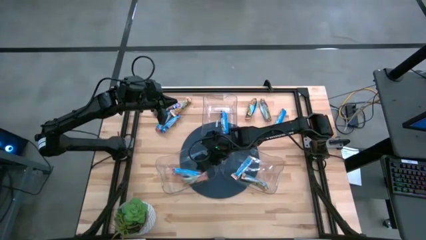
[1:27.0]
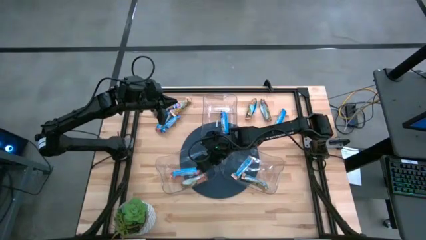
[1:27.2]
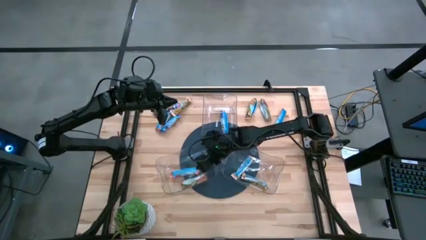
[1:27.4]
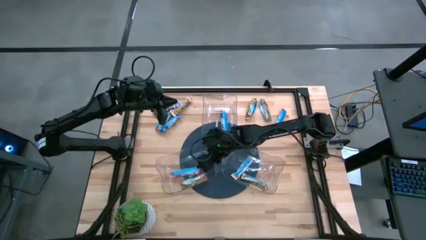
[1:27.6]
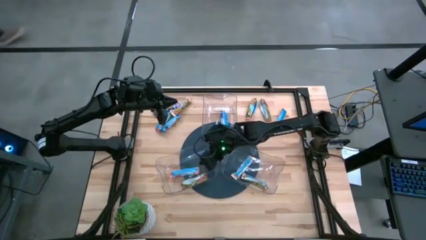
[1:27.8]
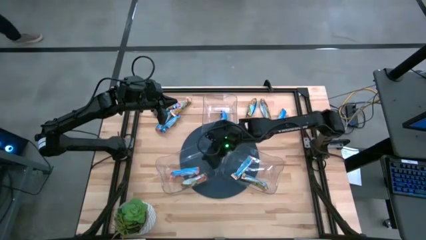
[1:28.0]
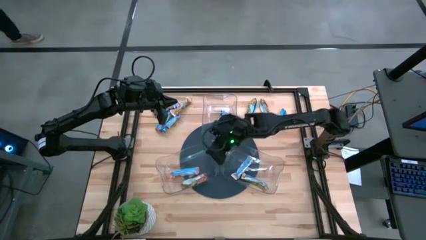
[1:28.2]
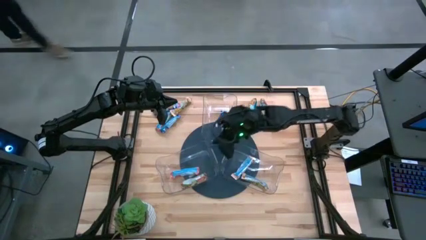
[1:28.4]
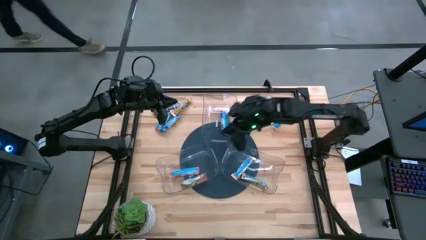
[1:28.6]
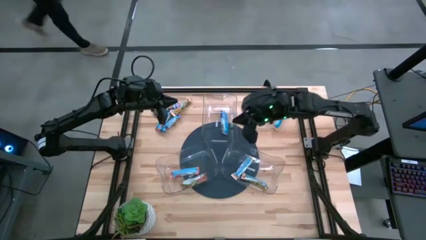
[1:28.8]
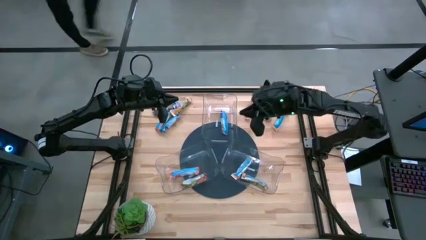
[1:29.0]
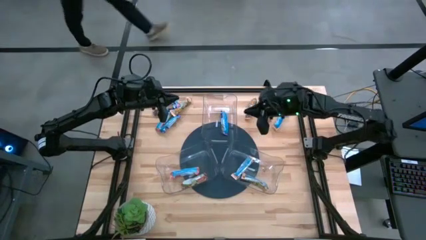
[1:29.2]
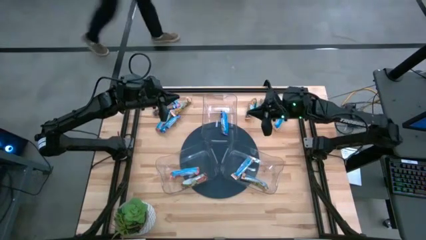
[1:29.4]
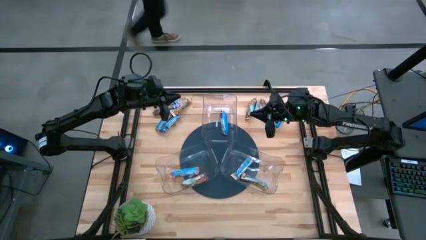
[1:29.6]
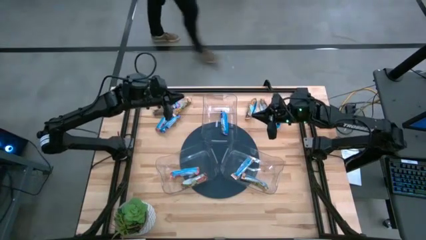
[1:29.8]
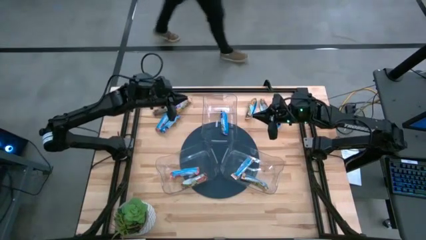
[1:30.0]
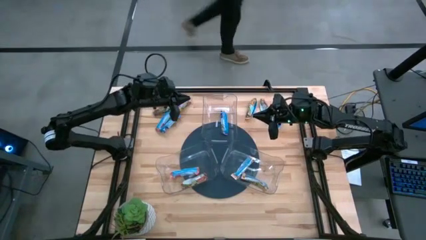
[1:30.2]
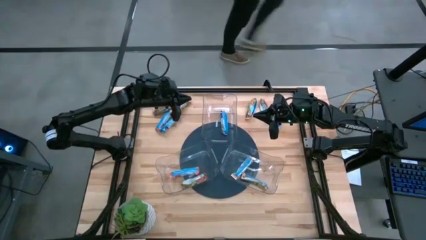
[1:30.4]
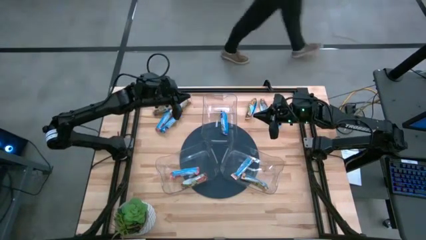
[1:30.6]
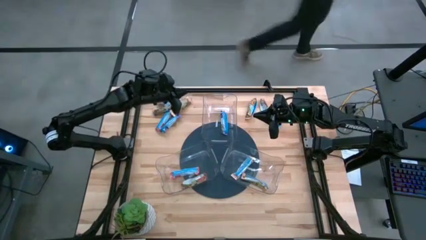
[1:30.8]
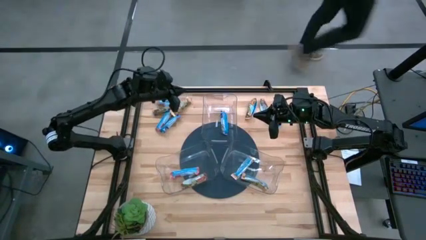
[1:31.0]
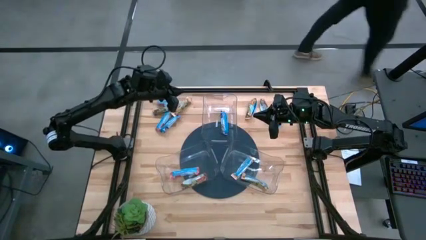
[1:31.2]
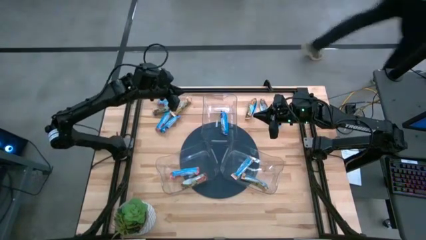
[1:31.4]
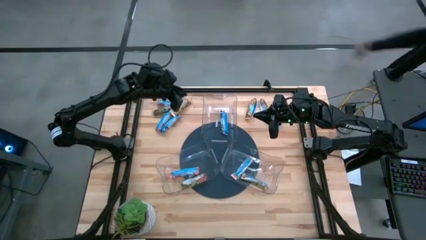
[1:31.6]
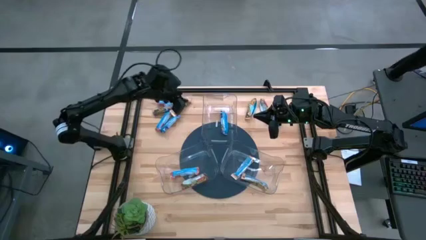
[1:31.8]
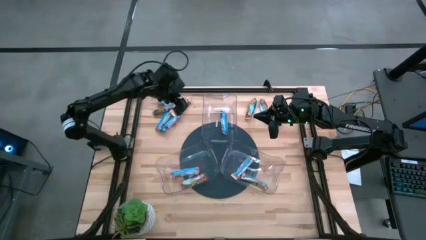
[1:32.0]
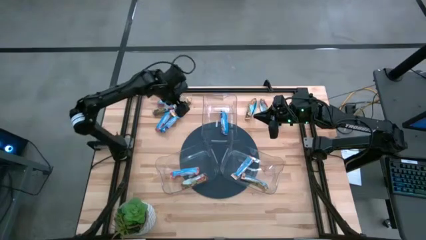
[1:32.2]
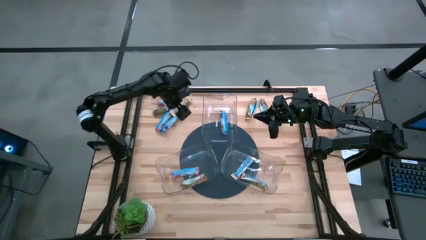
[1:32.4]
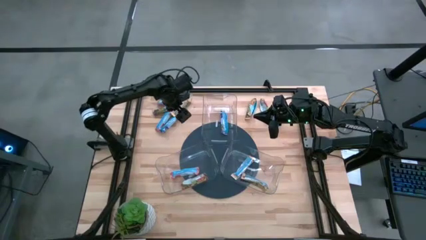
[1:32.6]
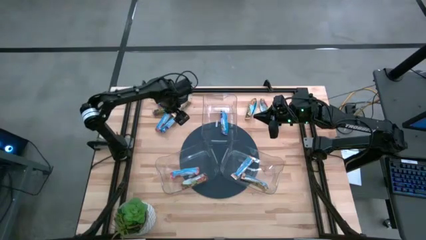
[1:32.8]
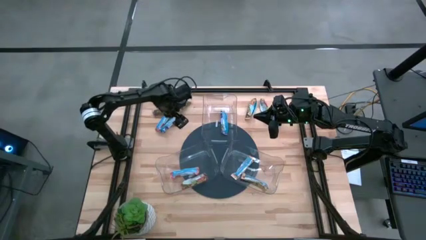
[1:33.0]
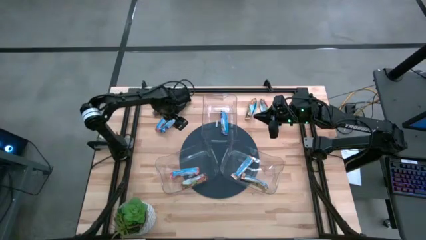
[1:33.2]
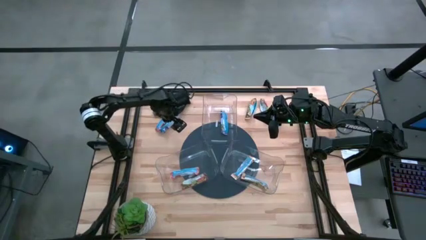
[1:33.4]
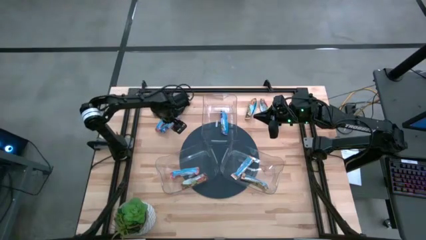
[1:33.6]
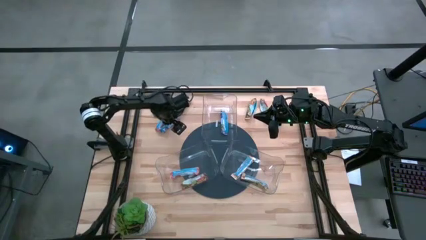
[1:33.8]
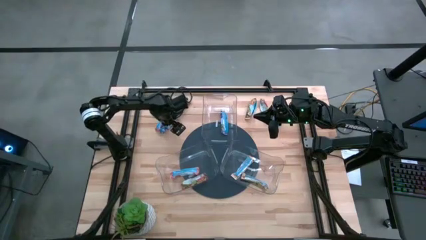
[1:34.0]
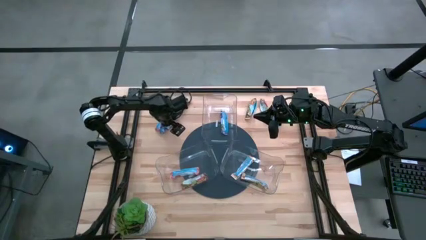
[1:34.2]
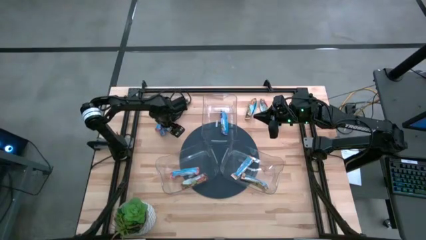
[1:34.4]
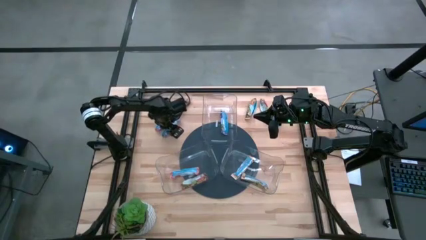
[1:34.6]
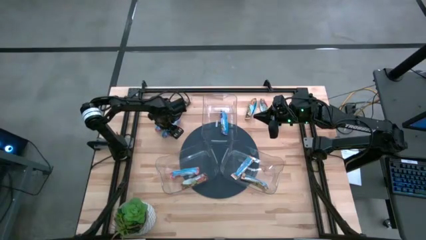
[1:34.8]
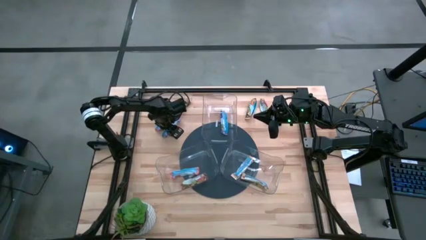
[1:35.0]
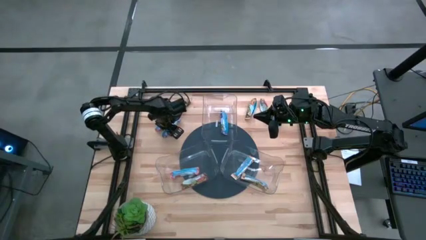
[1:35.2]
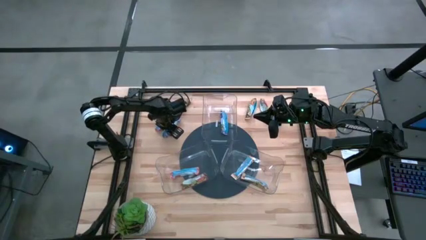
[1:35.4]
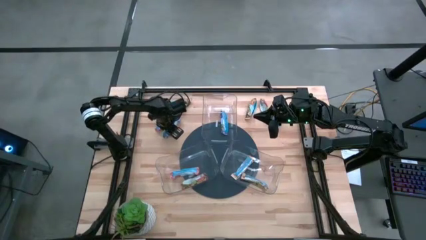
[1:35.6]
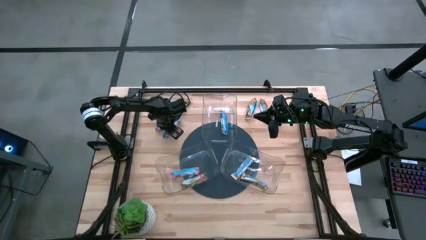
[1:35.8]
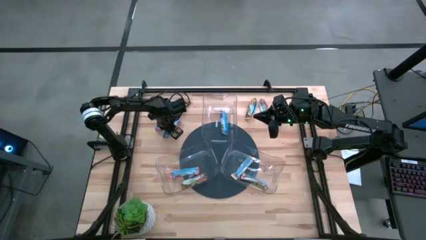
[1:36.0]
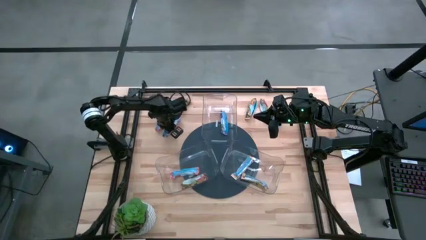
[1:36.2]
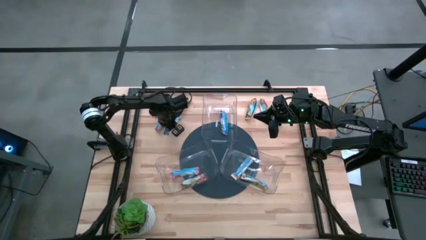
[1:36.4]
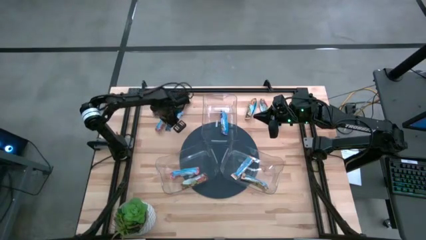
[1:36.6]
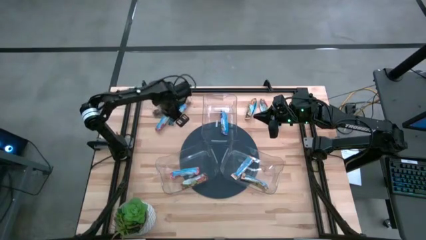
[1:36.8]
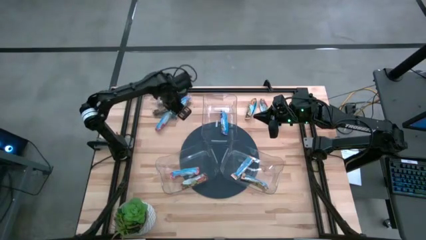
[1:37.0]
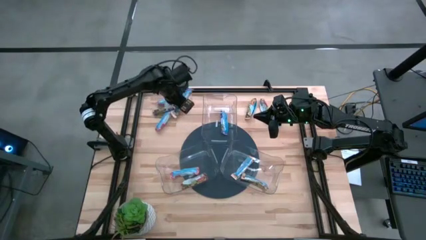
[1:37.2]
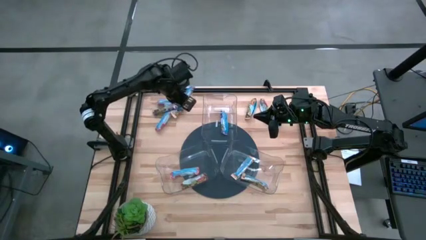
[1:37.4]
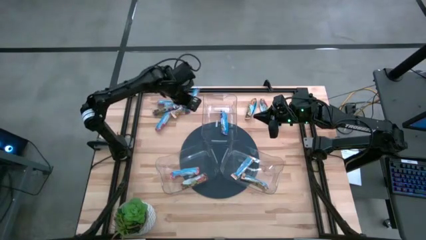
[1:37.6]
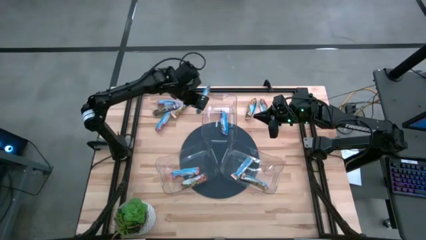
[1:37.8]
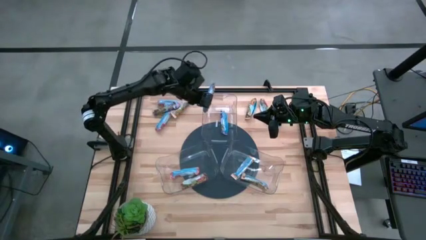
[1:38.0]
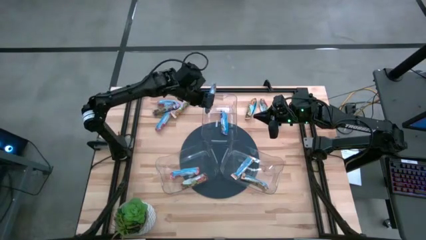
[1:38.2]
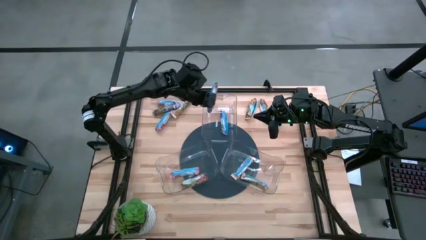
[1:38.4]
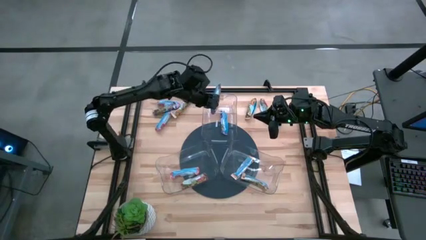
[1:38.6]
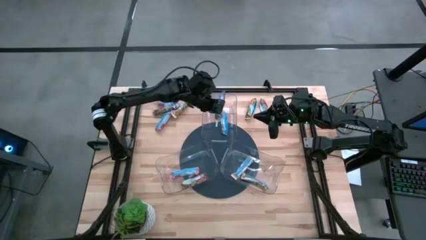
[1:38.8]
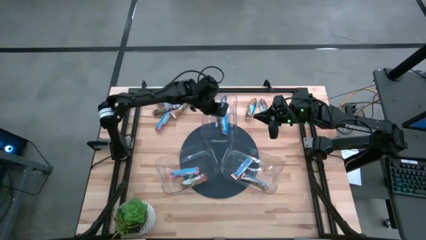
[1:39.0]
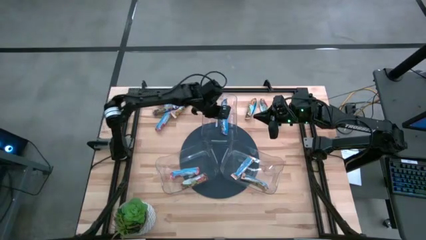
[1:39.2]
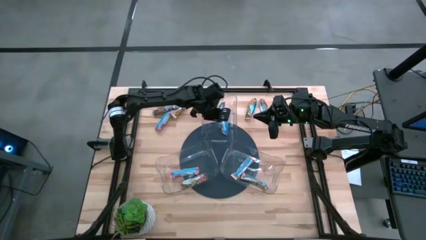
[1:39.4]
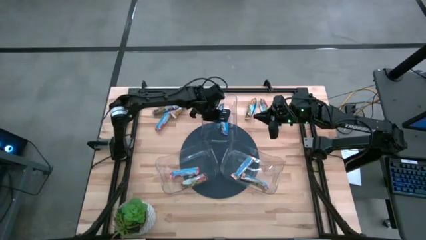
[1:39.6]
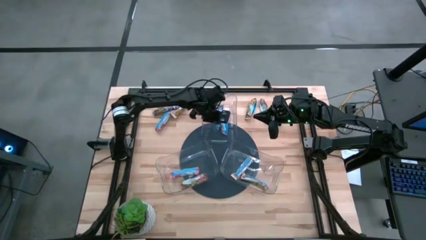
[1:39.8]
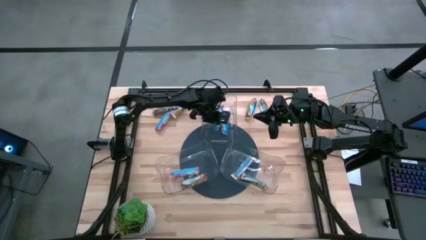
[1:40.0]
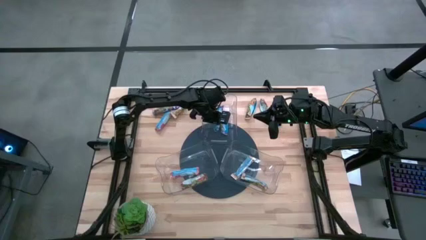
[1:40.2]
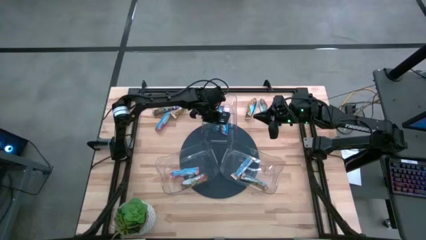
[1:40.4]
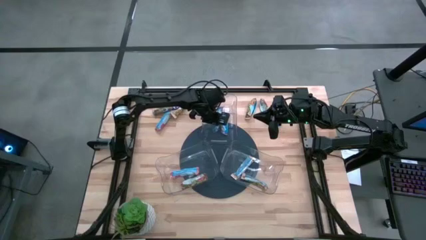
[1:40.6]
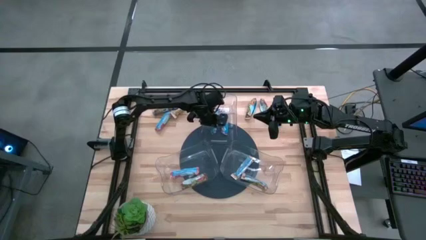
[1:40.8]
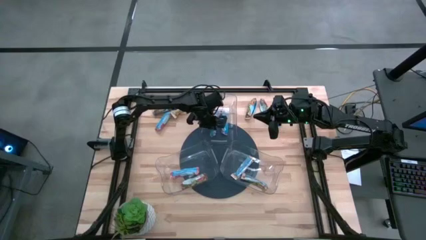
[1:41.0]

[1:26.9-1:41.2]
Task: Pick and place Granola Bars by type
Put the bottom blue granola bar into the top transparent bin

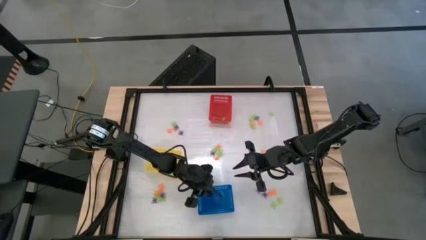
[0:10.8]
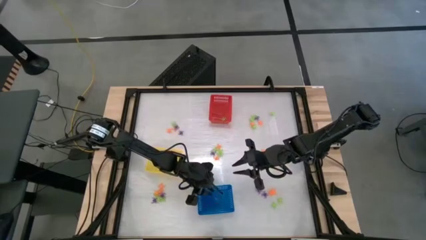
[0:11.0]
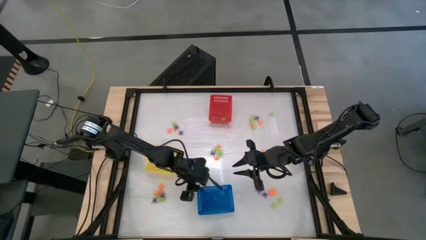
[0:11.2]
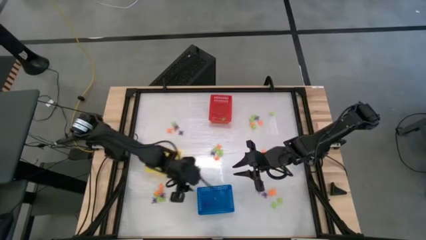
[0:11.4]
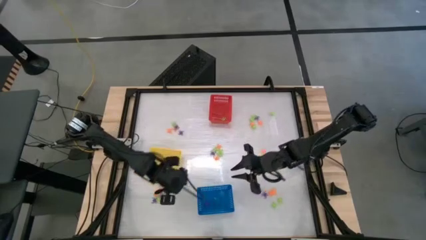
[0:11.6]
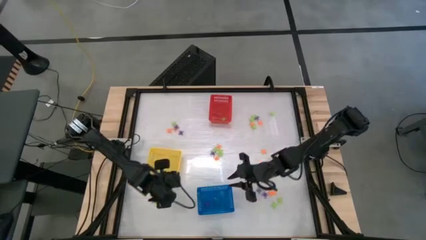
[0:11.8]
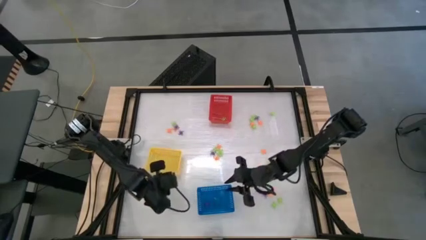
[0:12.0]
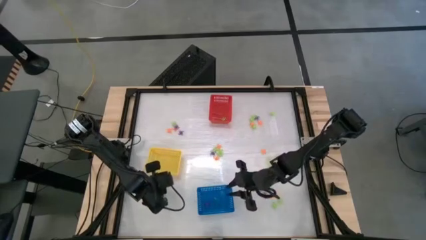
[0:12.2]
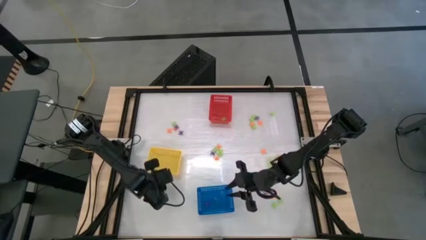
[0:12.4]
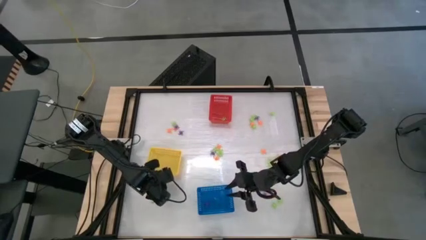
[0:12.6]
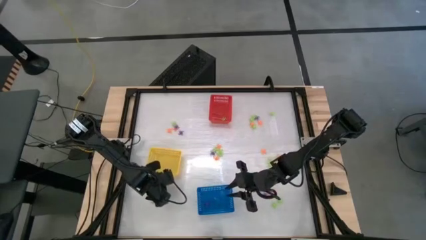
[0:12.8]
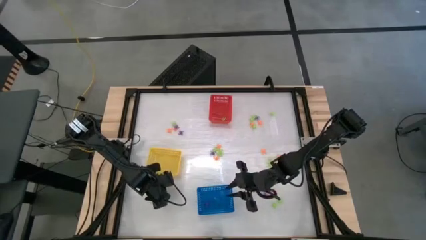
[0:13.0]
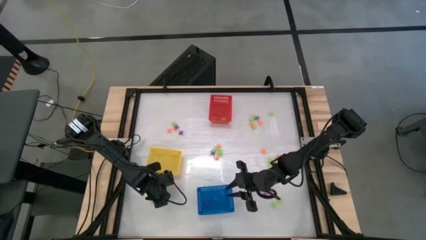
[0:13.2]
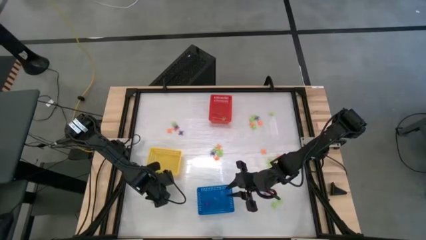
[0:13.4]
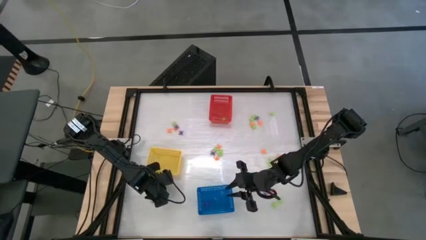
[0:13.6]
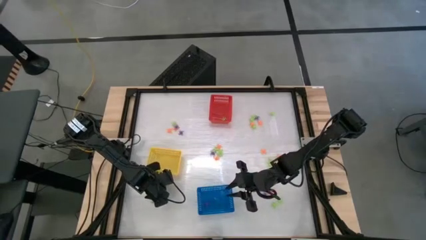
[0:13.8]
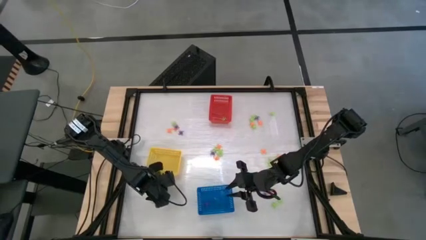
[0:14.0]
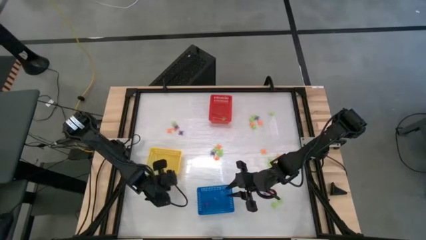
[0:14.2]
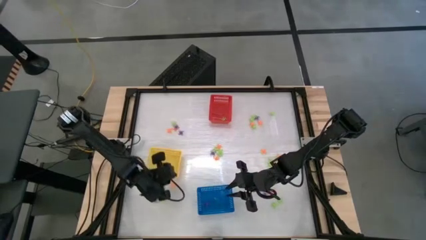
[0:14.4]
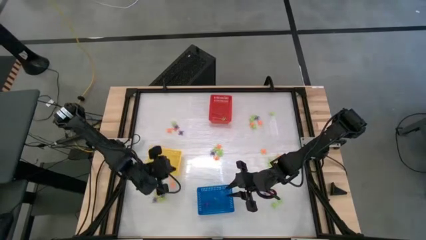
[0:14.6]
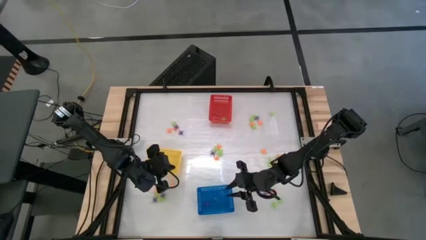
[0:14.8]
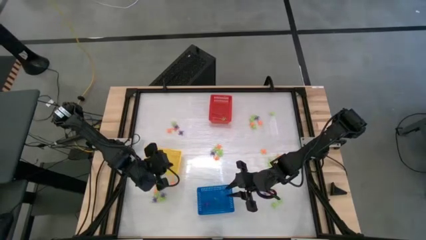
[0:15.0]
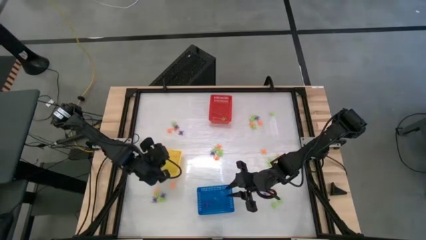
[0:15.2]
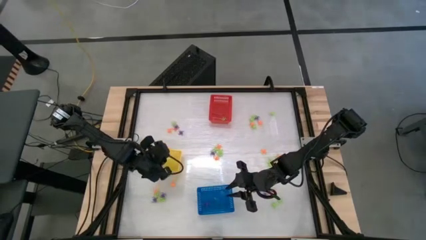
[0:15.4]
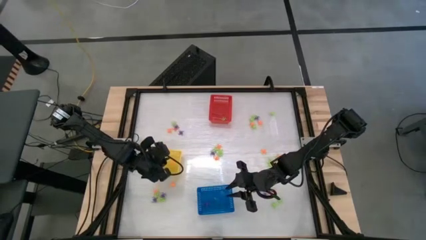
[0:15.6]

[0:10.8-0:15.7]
Task: Sort Halloween decoration
Put the orange spider toy into the yellow basket
